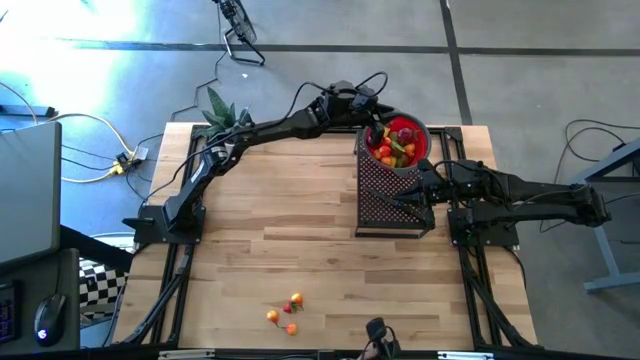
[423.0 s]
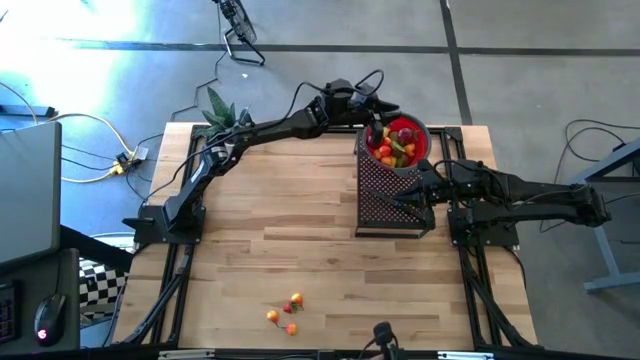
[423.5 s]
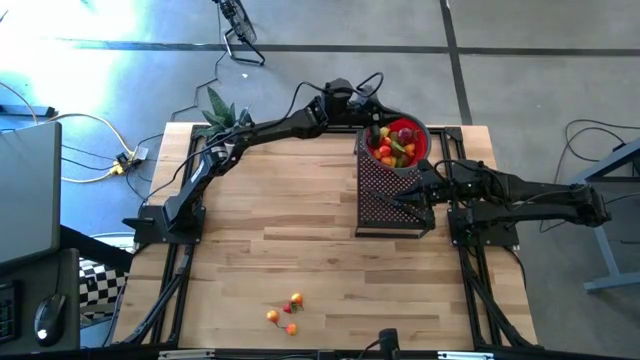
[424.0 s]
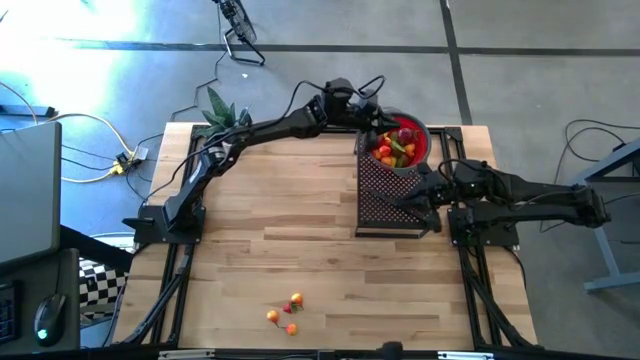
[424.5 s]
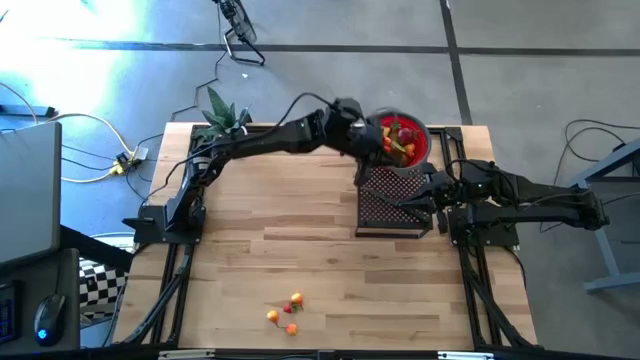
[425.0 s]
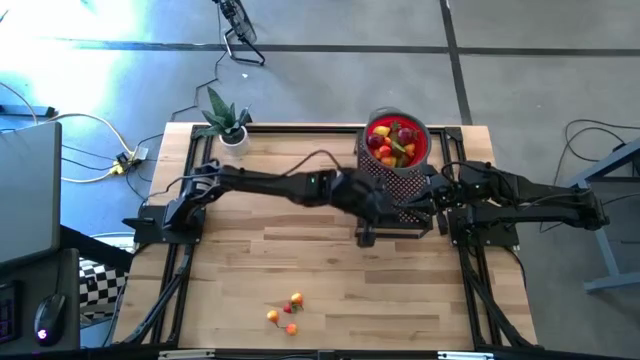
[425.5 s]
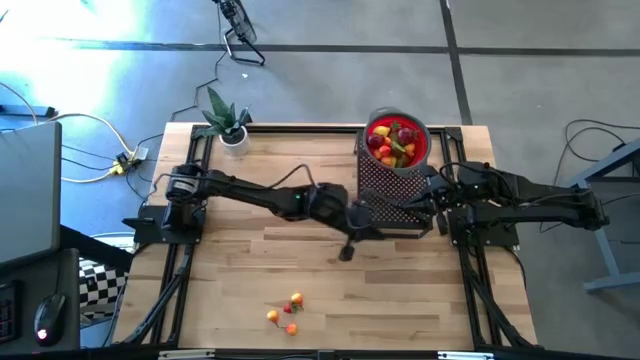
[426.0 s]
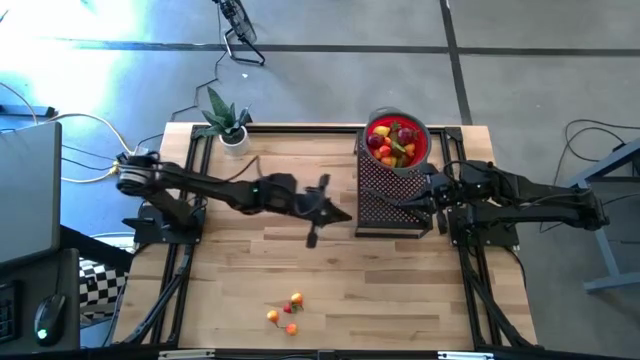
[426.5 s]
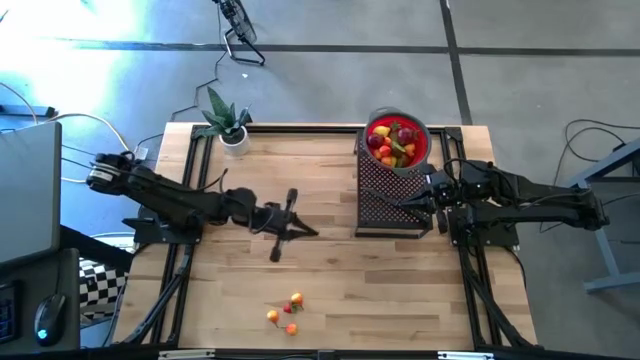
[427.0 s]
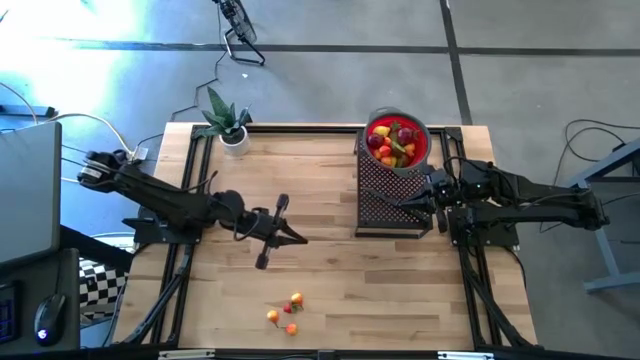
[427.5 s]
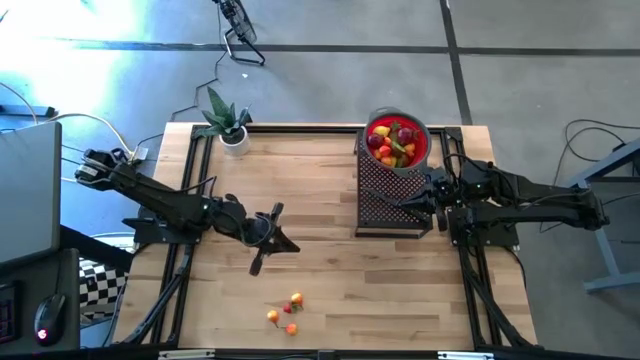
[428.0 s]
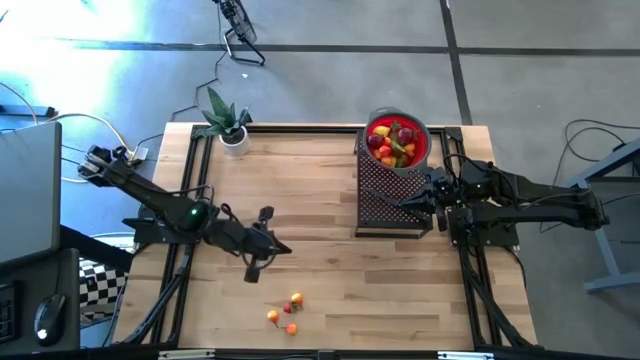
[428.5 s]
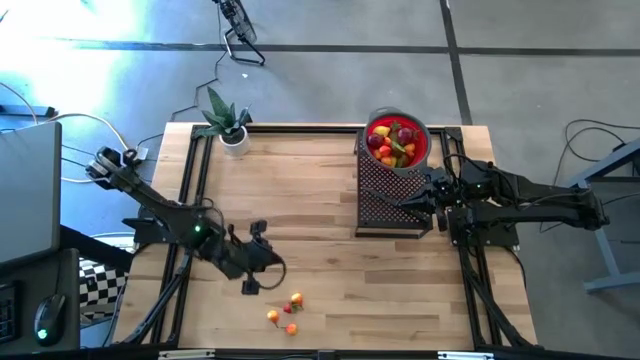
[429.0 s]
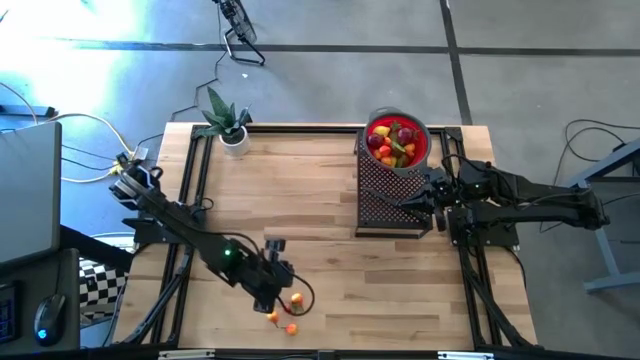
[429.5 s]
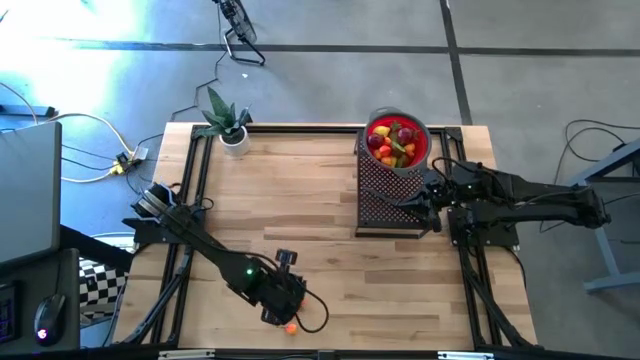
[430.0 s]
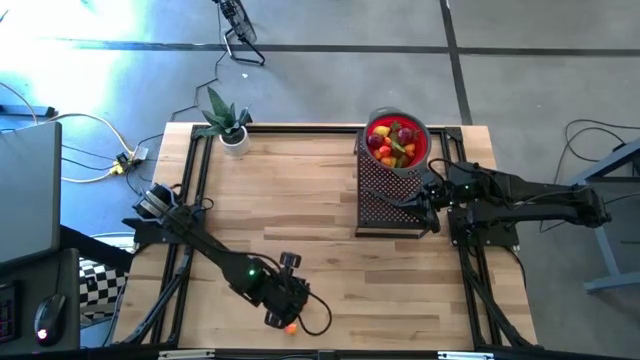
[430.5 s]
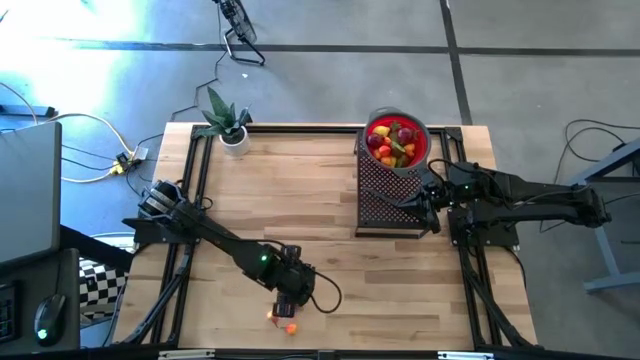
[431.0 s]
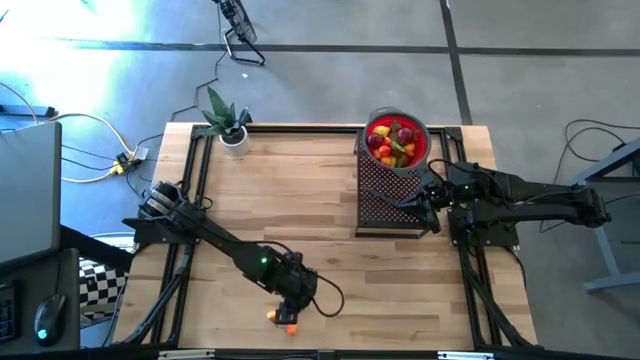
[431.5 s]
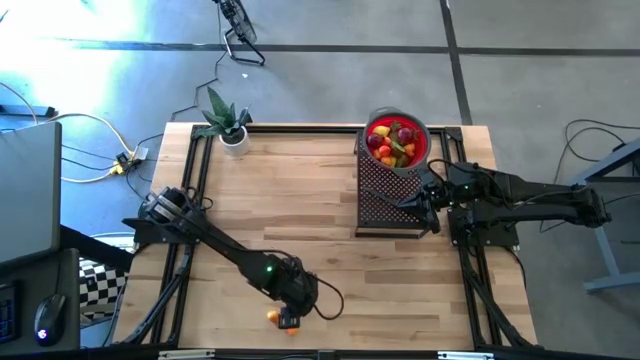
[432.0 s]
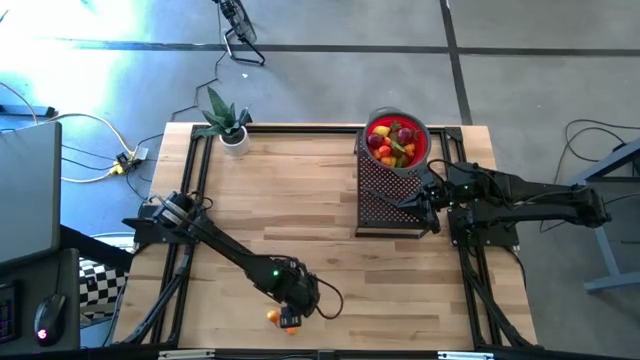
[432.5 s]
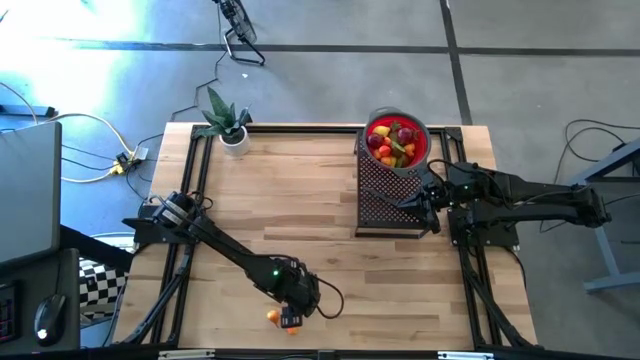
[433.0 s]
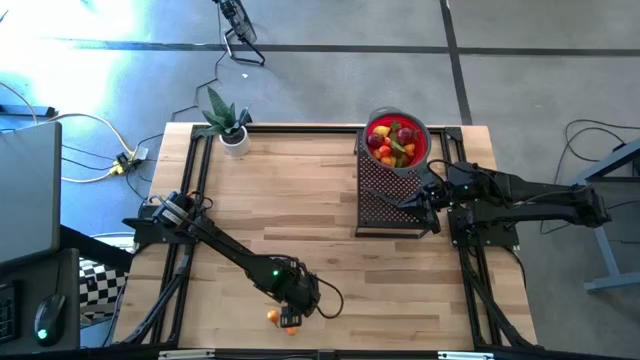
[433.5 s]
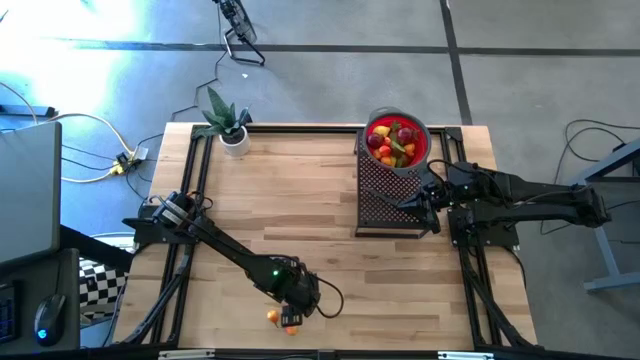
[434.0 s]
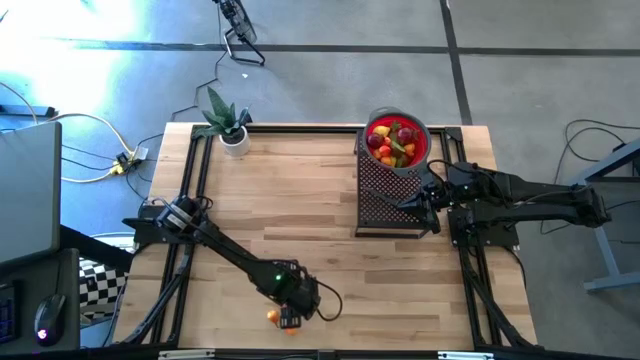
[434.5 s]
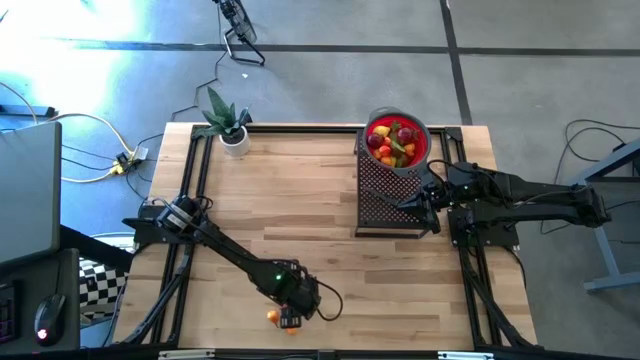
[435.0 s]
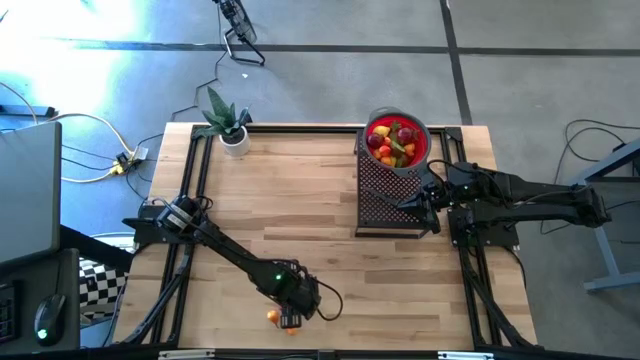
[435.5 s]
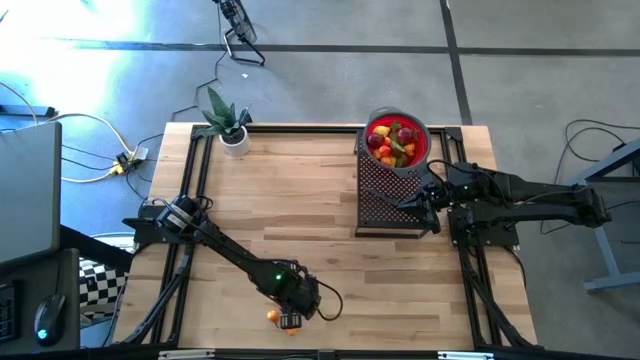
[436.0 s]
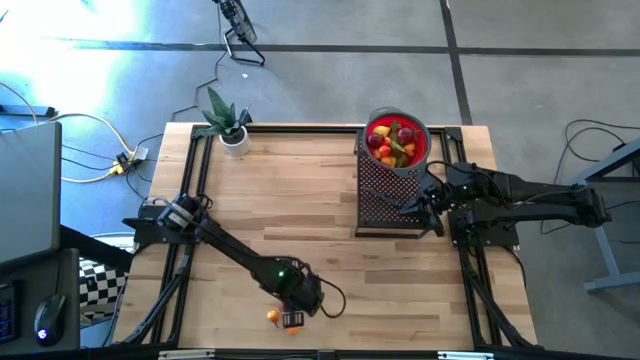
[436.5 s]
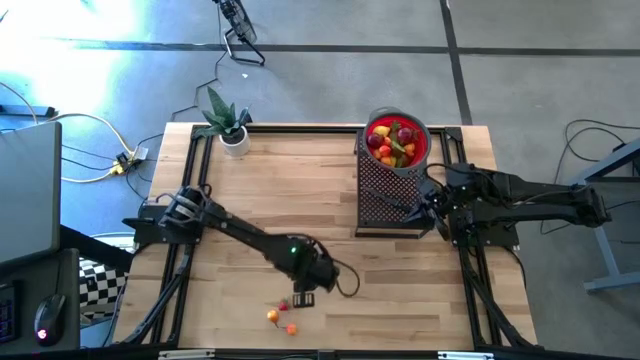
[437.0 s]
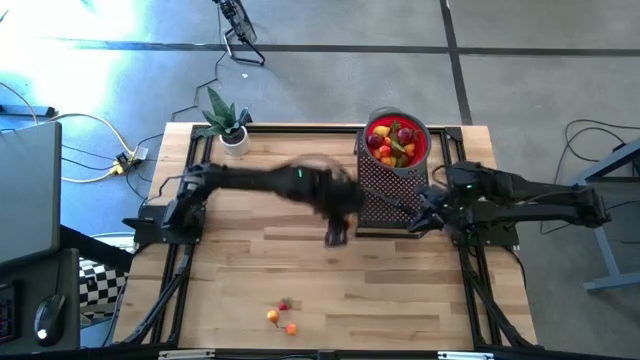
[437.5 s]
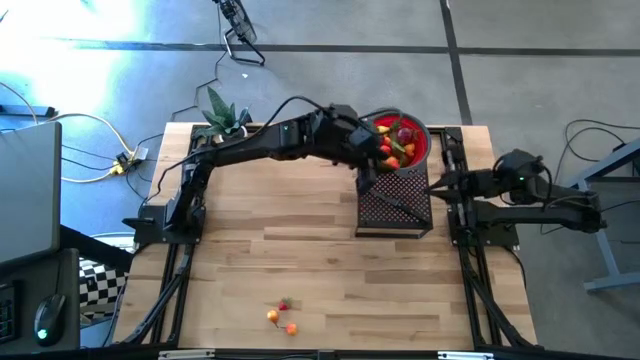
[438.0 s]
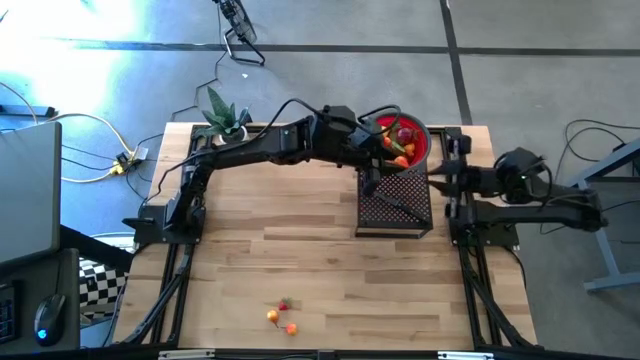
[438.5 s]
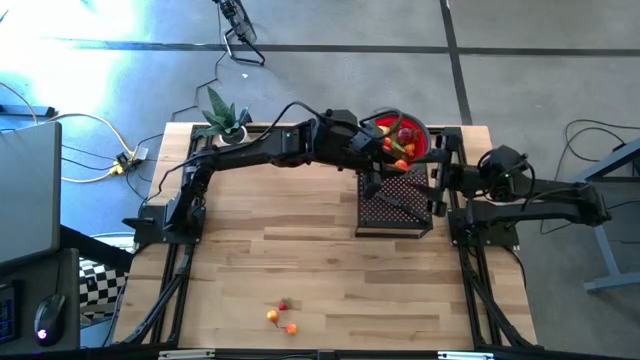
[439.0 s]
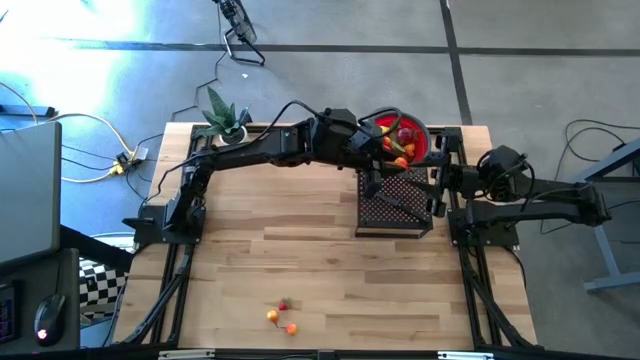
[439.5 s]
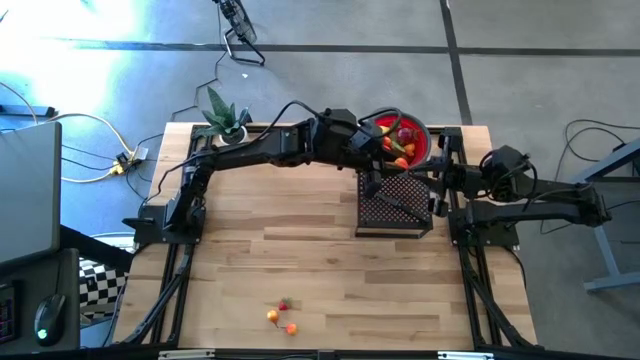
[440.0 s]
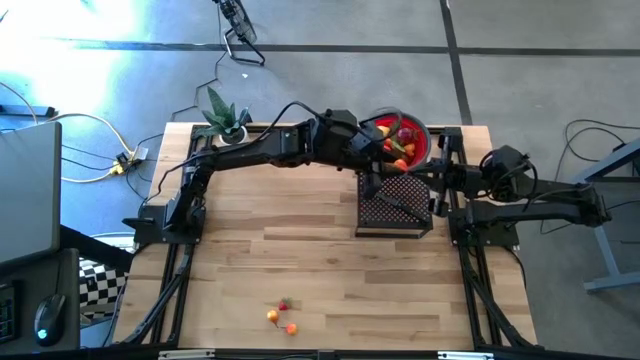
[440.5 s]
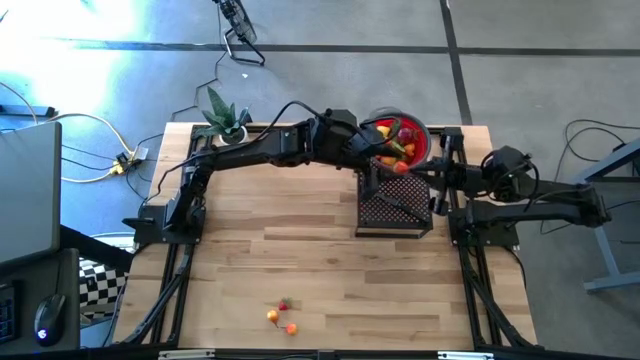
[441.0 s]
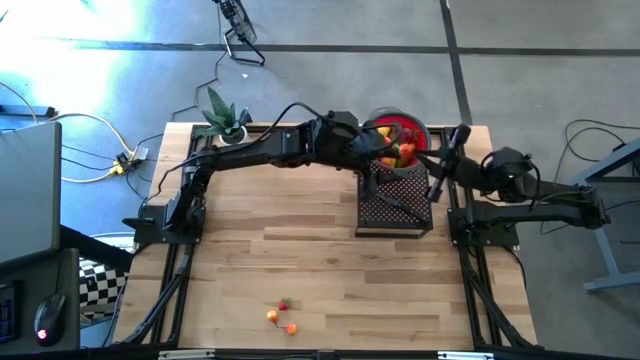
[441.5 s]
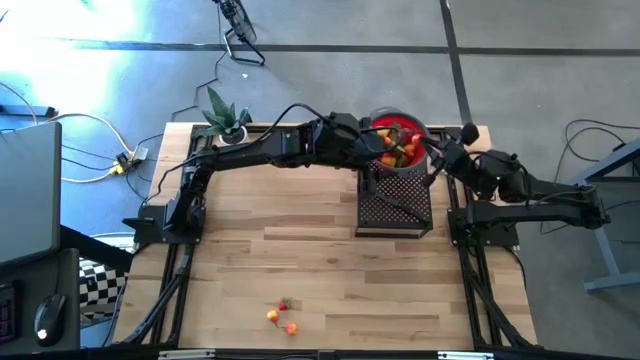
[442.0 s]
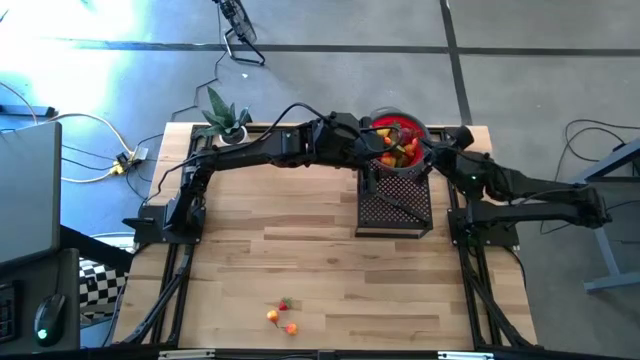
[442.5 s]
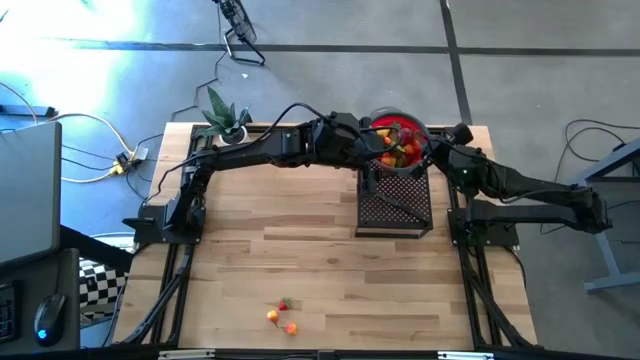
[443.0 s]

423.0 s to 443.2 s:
Task: Pick & Place Fruit
Put the pear into the strainer bowl on the shelf

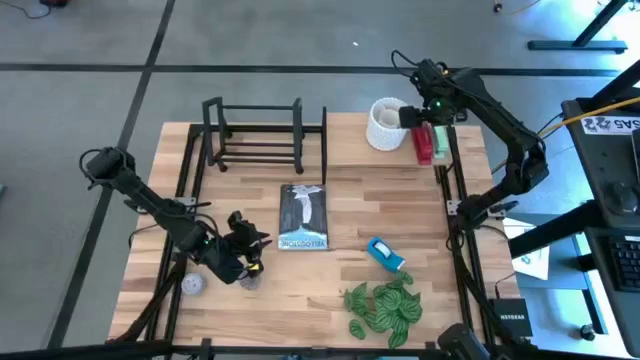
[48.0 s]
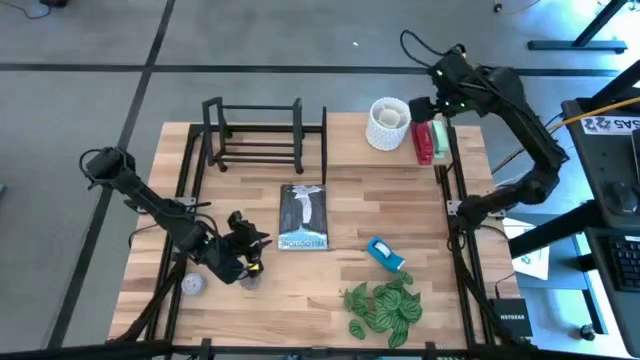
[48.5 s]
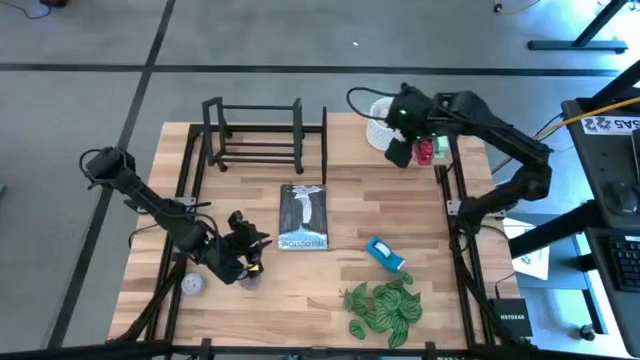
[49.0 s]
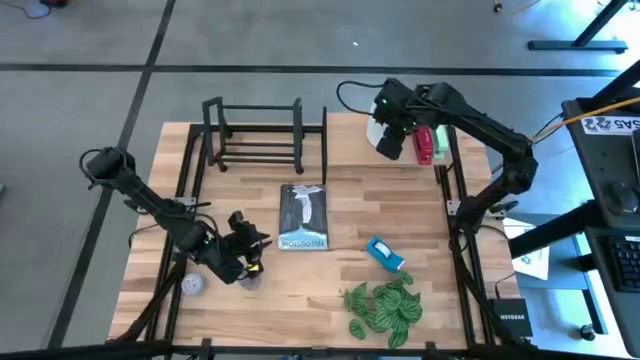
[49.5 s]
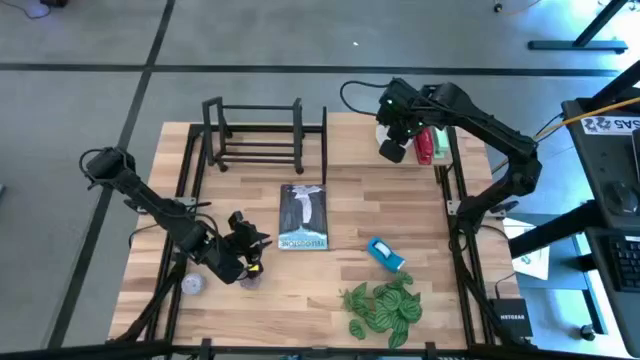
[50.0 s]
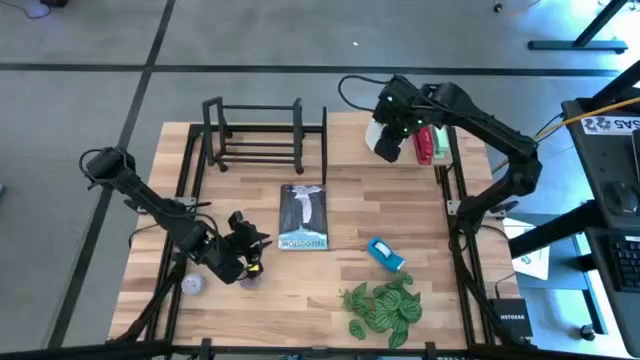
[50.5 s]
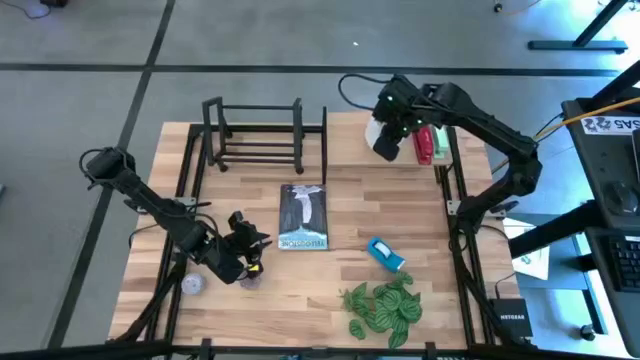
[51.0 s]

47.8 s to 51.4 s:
Task: Stock shelves
Adjust the white pencil holder on the shelf
